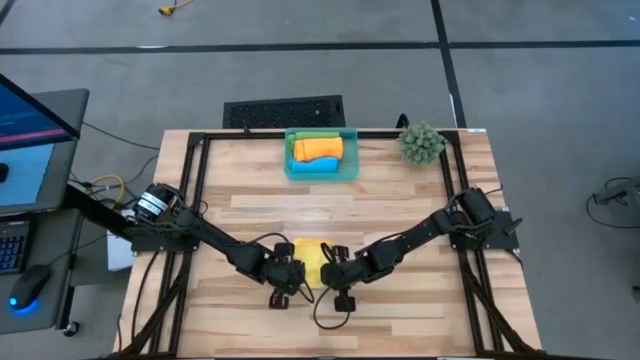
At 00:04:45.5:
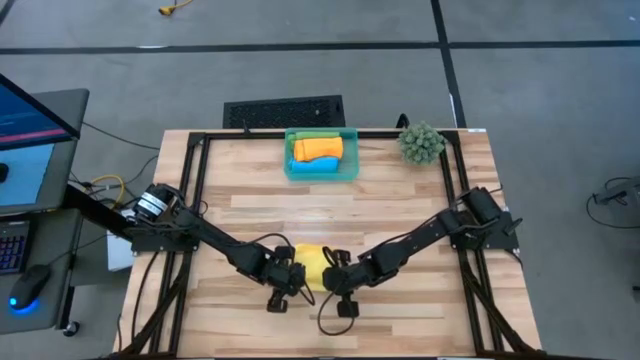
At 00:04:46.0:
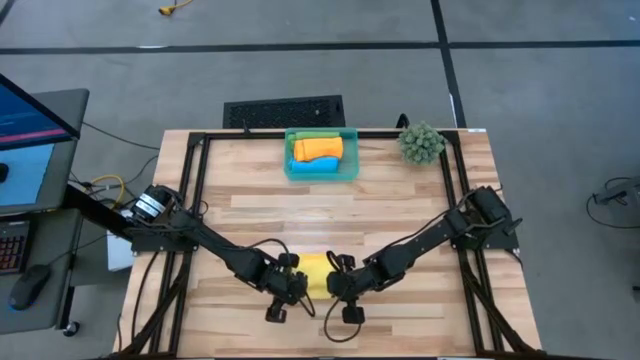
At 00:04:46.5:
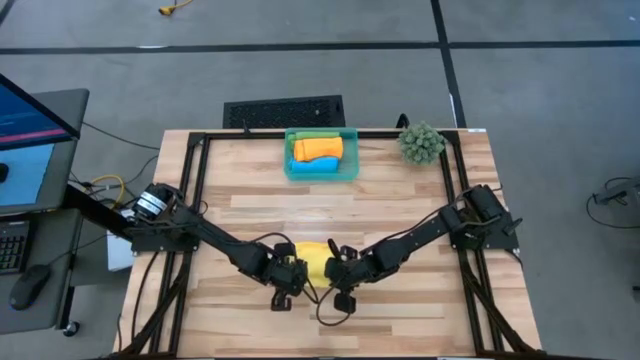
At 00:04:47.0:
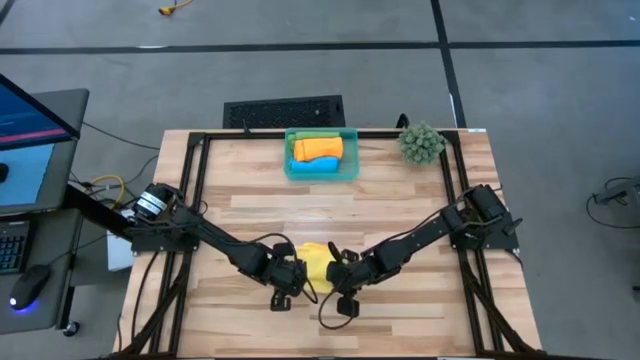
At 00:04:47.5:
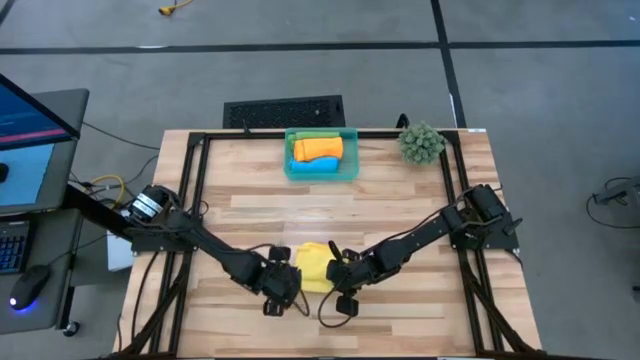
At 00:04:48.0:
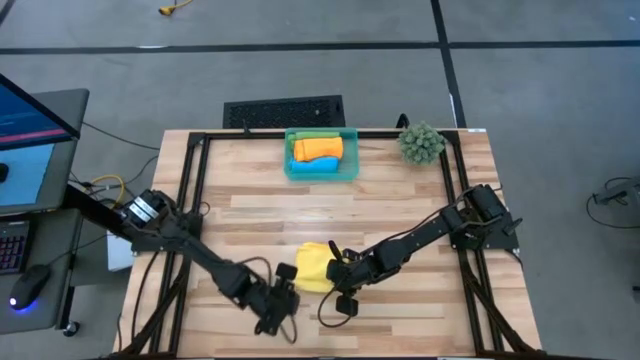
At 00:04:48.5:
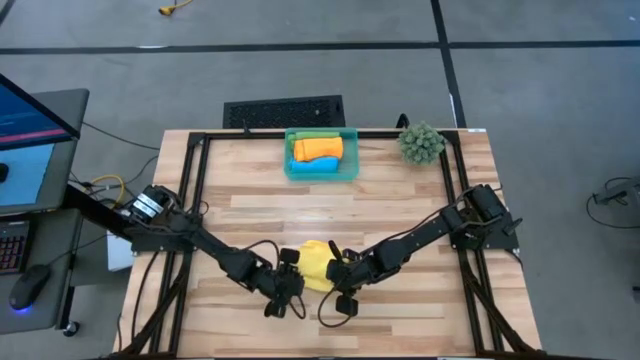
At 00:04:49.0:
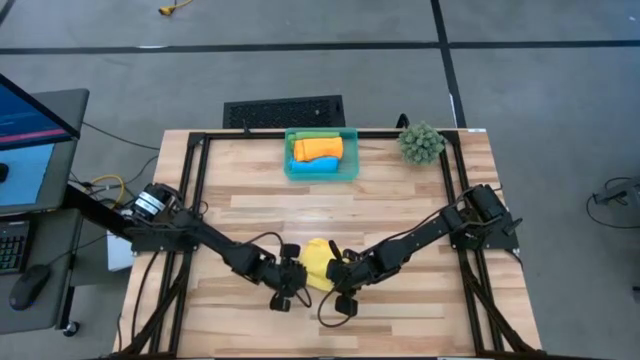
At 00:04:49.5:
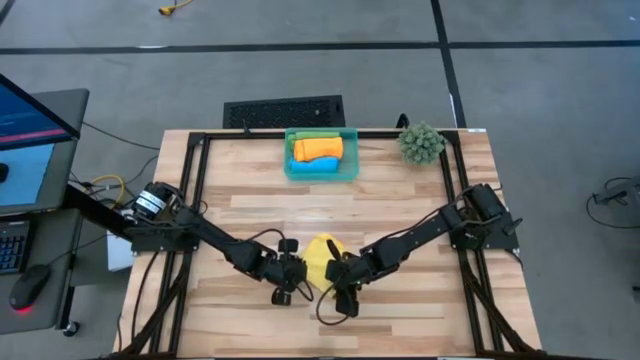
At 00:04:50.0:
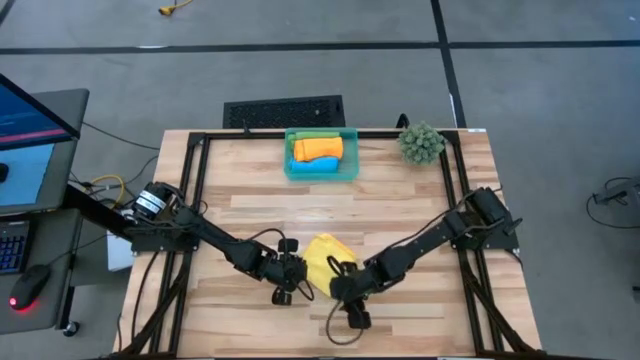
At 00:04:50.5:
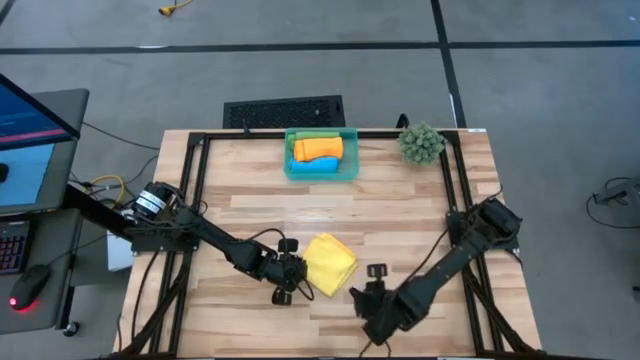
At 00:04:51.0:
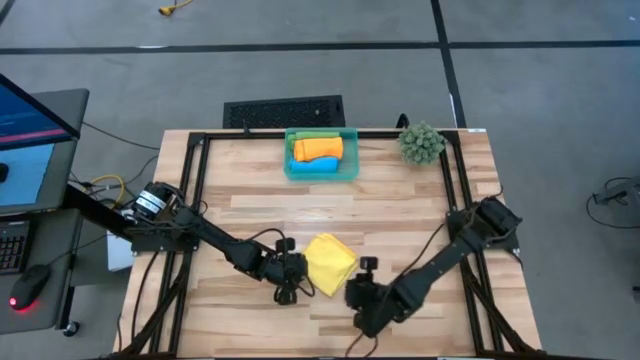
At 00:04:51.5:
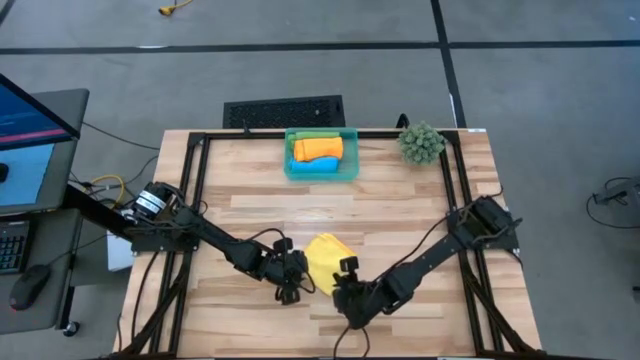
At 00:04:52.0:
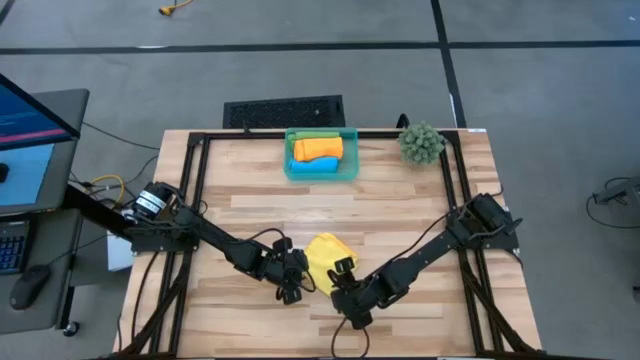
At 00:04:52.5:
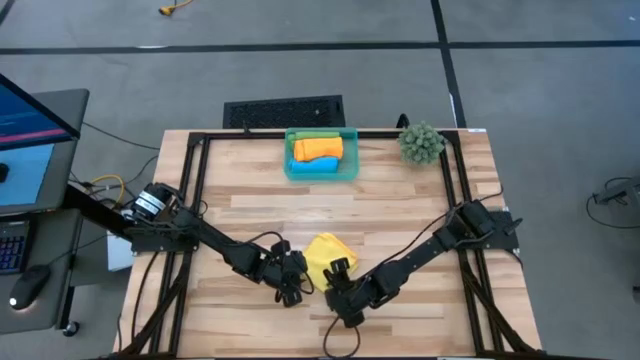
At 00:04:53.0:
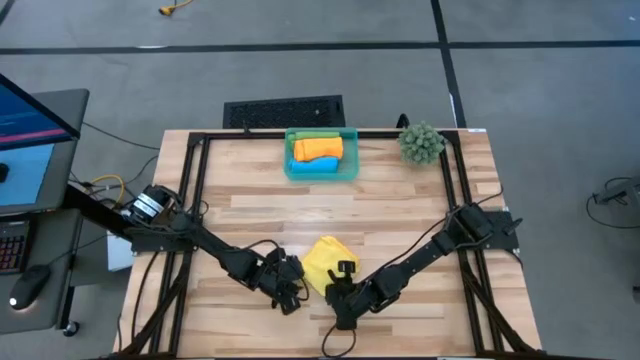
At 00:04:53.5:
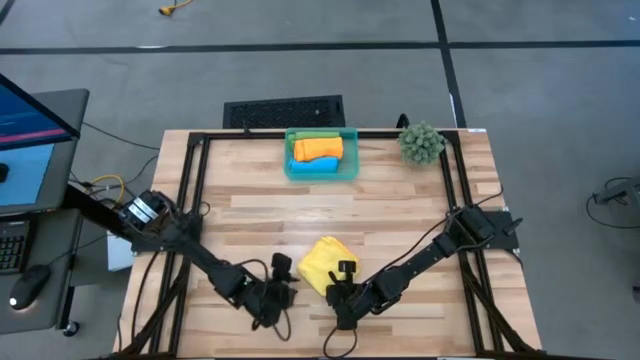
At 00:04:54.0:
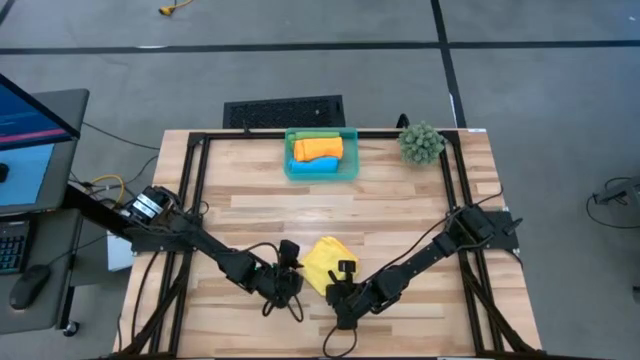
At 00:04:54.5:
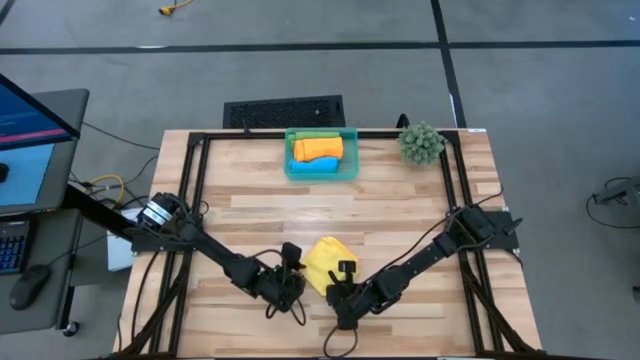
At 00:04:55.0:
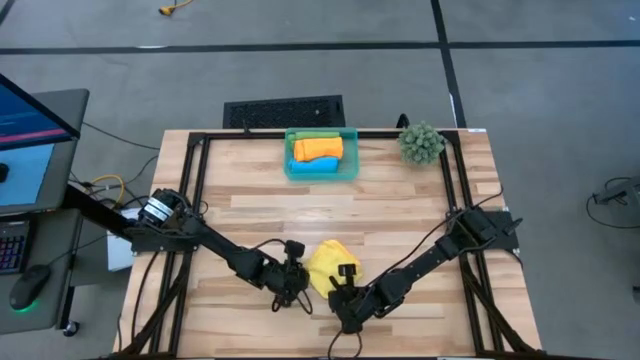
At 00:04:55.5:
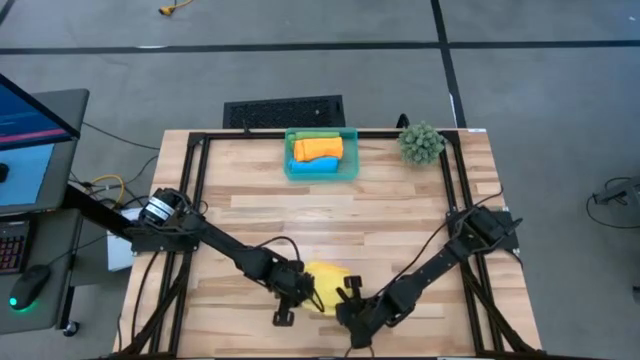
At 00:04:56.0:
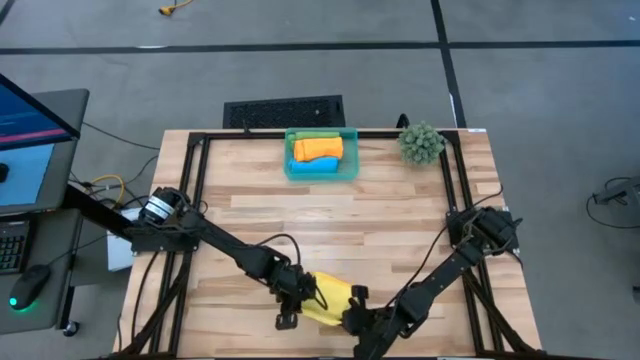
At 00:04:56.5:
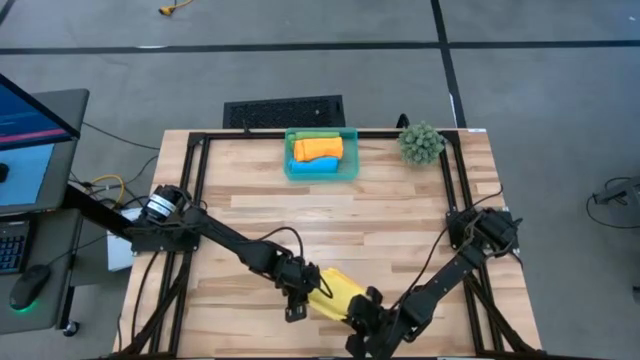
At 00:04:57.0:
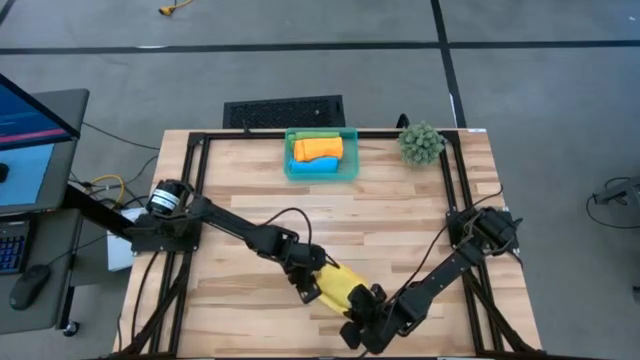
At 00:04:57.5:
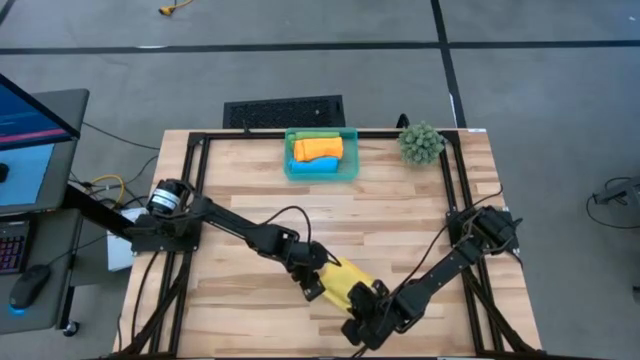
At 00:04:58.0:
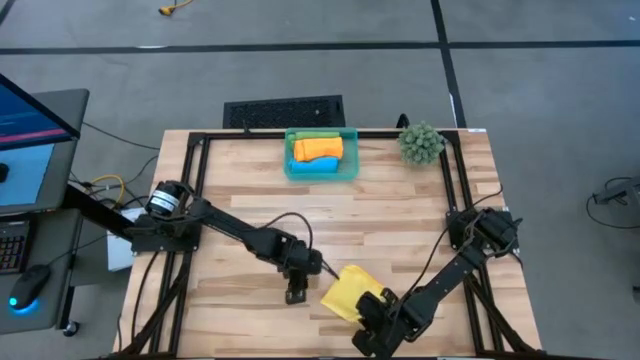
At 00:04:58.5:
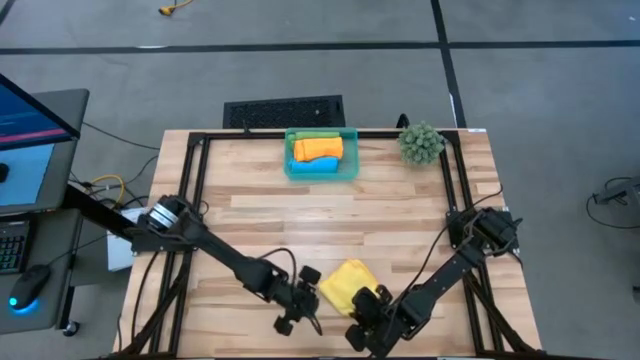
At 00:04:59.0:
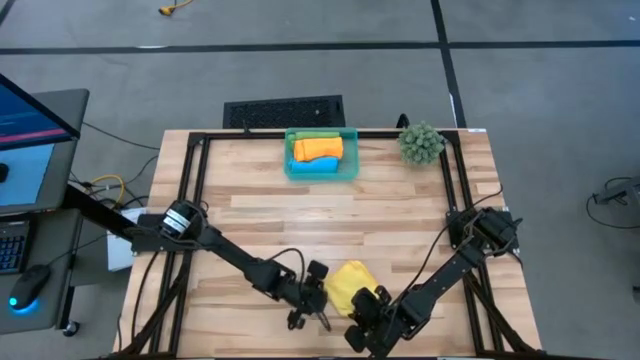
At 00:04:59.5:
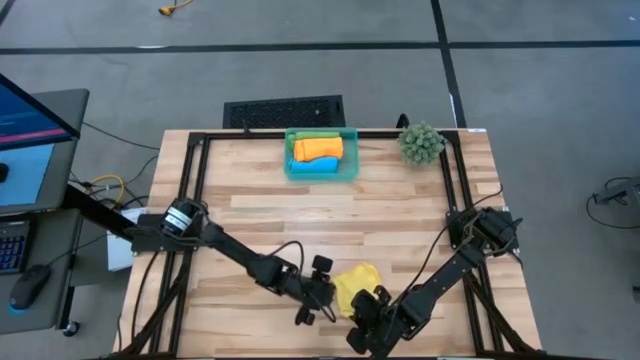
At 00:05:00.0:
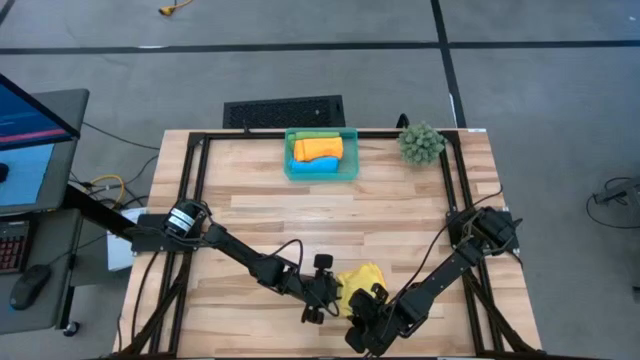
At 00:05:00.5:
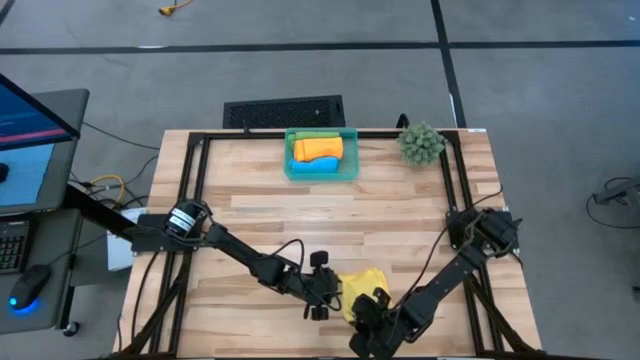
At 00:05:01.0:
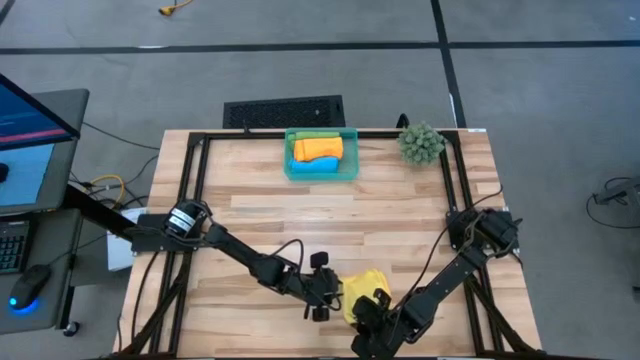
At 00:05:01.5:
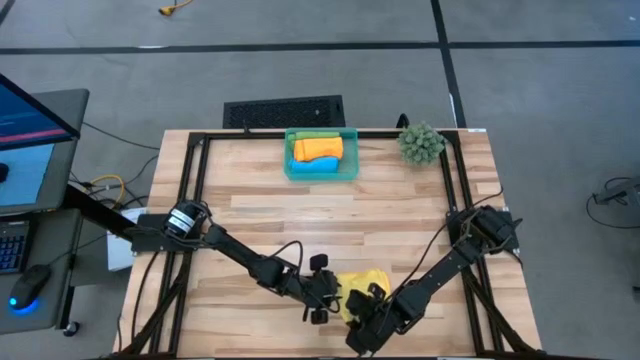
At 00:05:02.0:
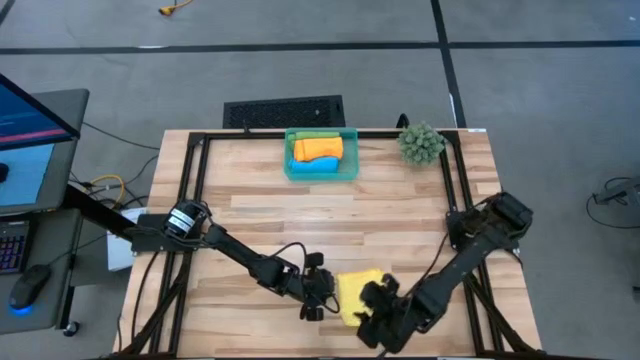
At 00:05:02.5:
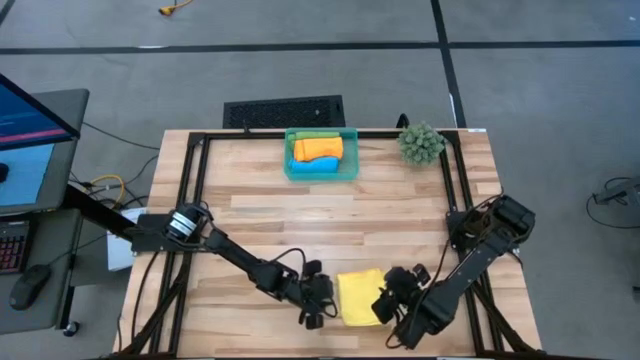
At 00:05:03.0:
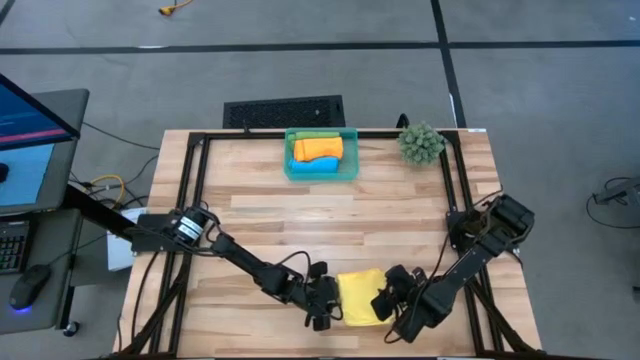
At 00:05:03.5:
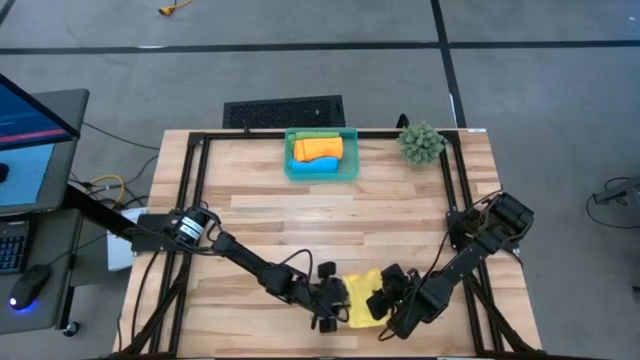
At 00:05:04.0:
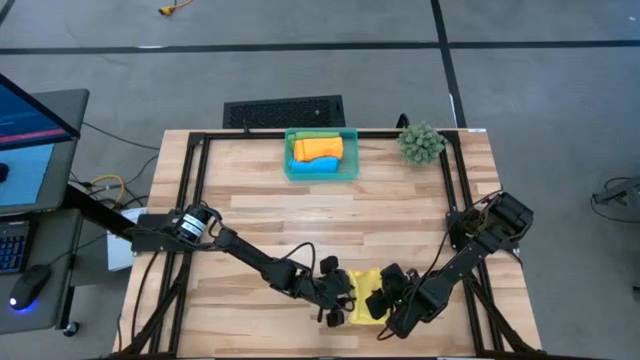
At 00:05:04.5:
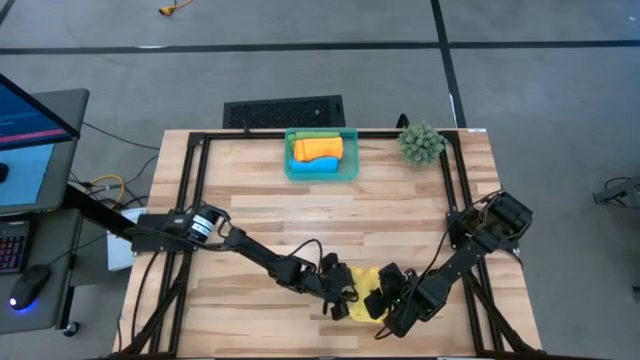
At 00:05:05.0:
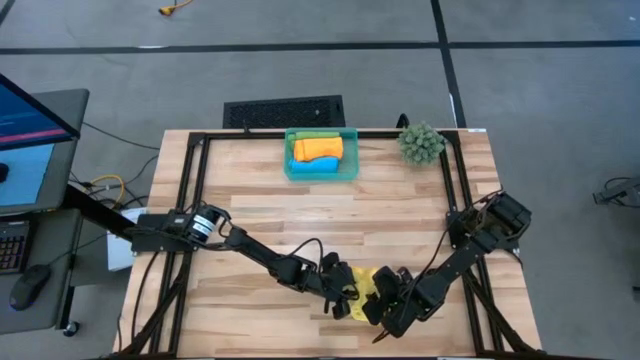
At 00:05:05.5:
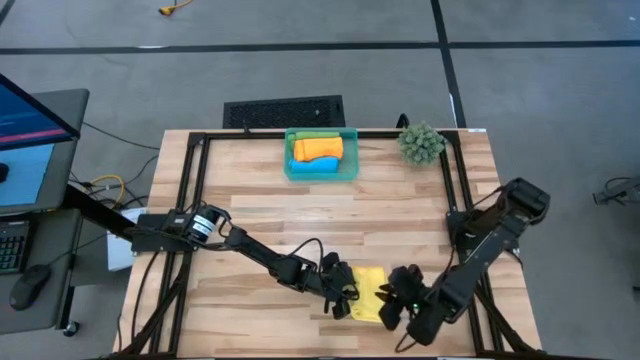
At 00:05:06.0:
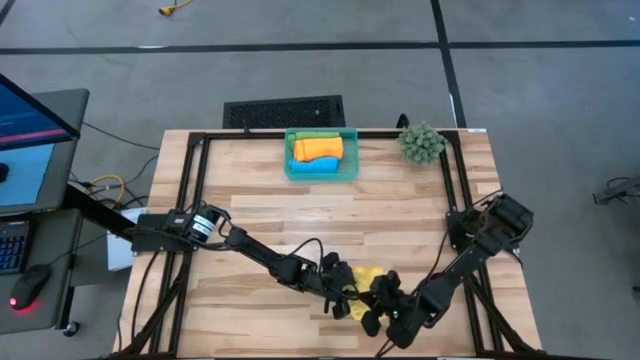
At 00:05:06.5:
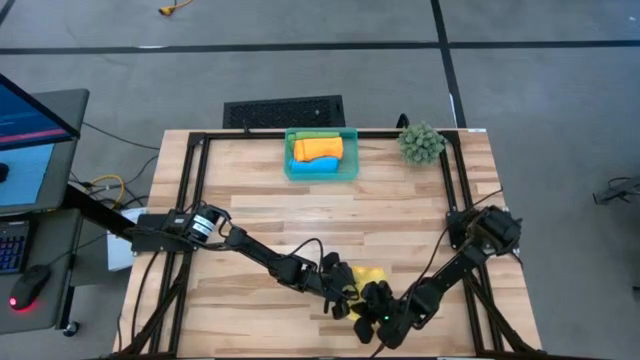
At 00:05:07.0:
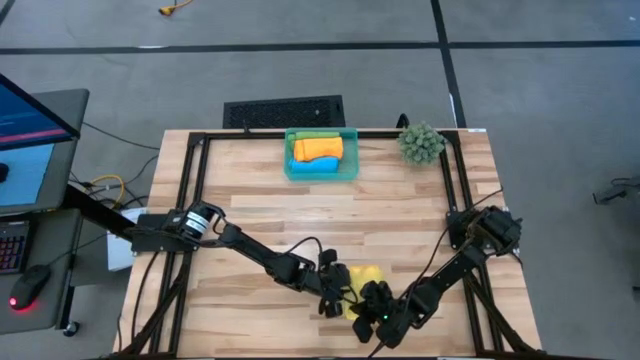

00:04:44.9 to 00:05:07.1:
Task: Roll microfiber towels into tight, uniform cylinder then place into a basket
Roll the yellow towel
